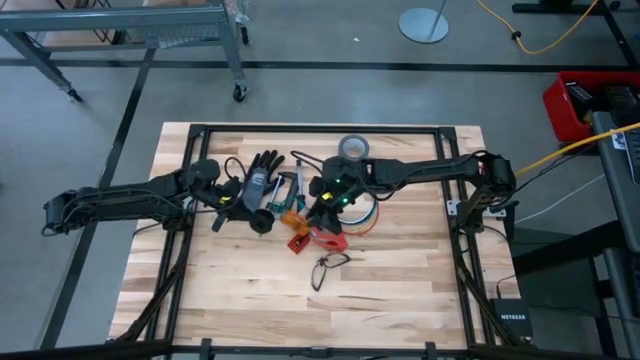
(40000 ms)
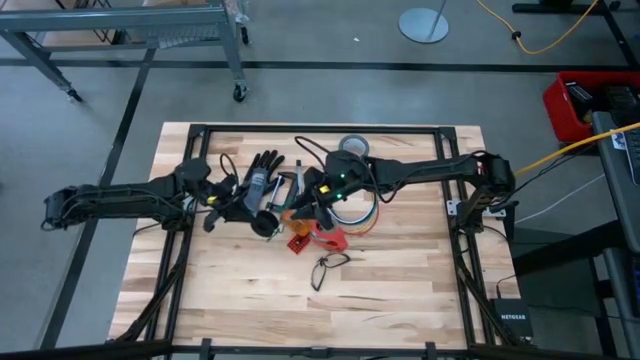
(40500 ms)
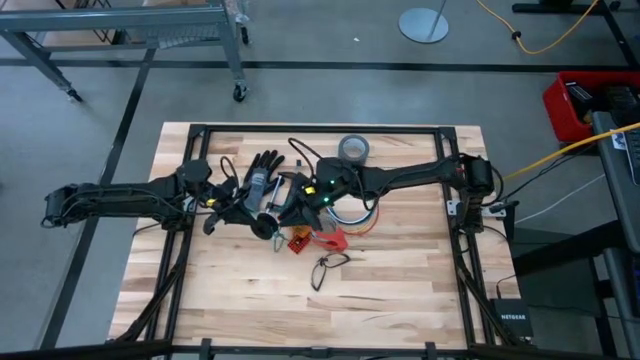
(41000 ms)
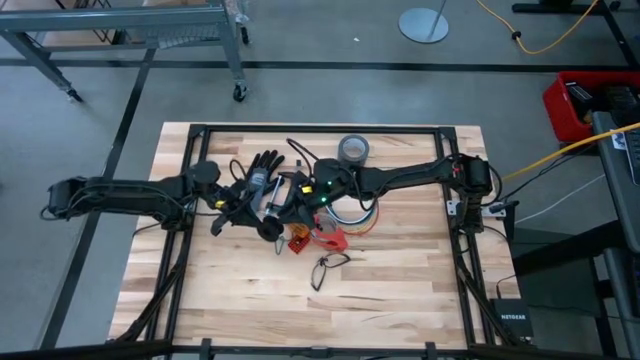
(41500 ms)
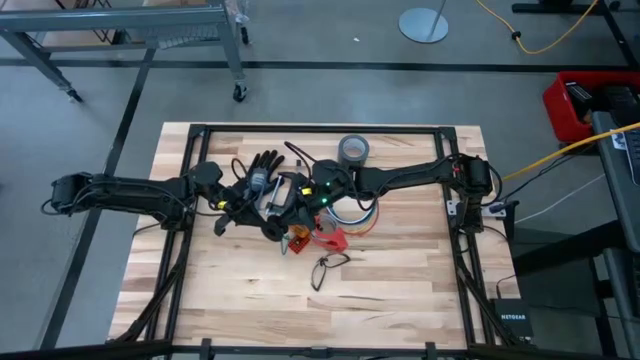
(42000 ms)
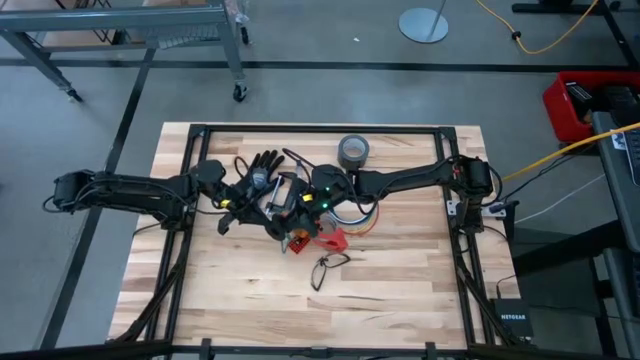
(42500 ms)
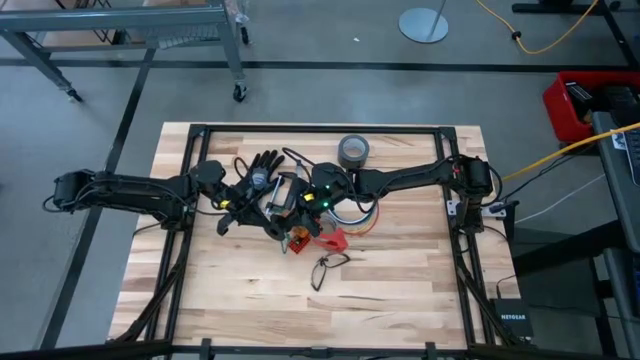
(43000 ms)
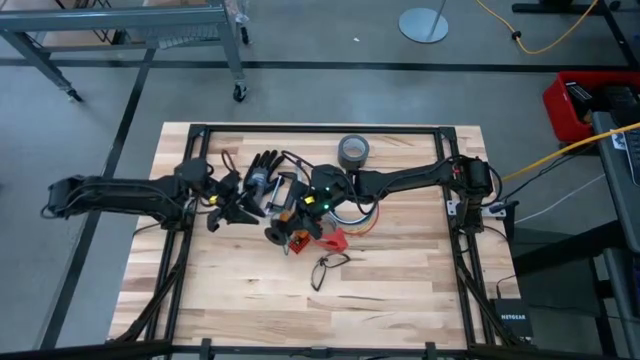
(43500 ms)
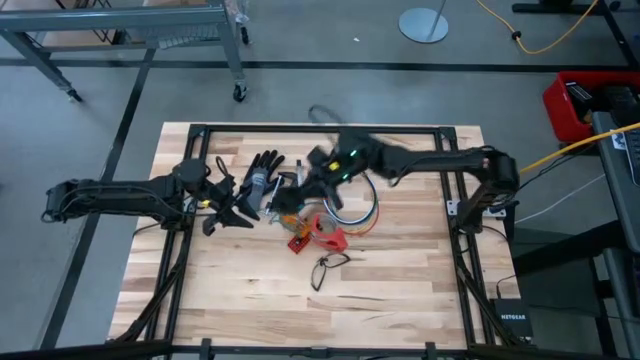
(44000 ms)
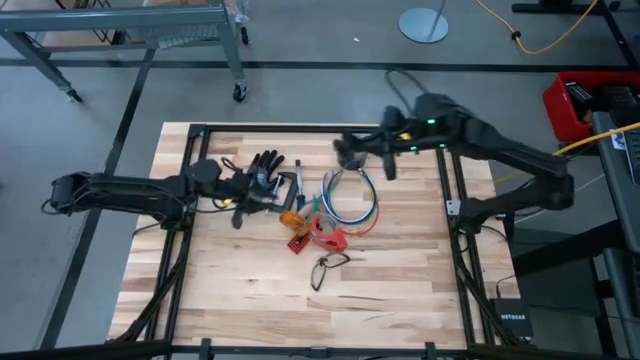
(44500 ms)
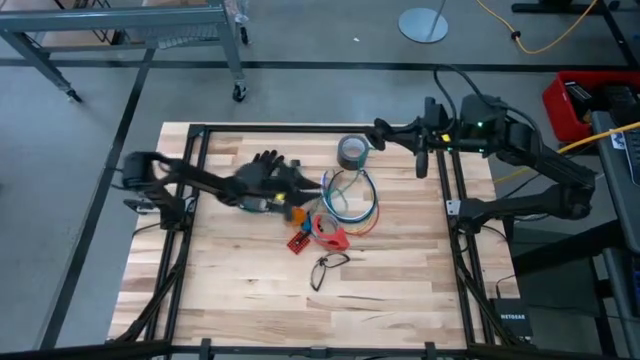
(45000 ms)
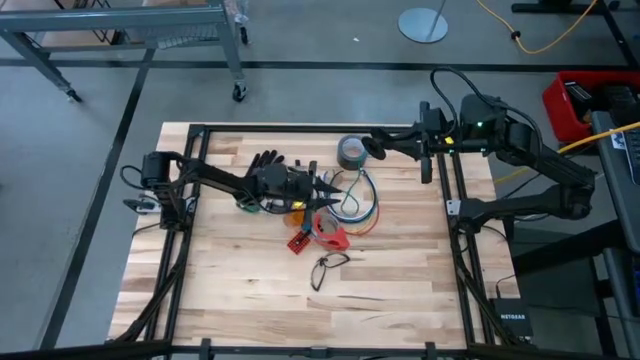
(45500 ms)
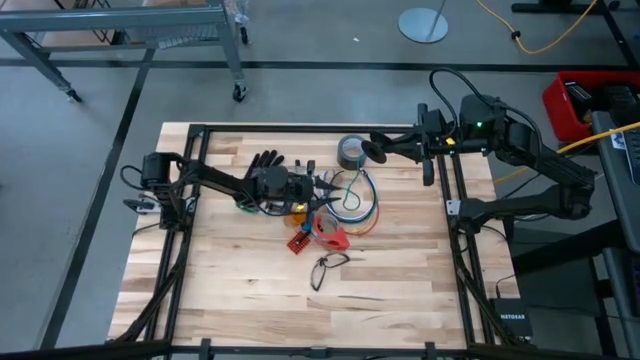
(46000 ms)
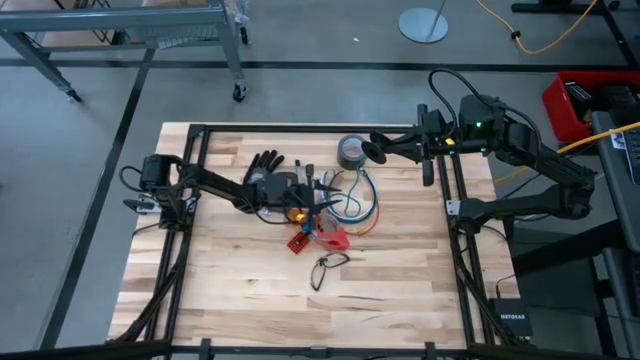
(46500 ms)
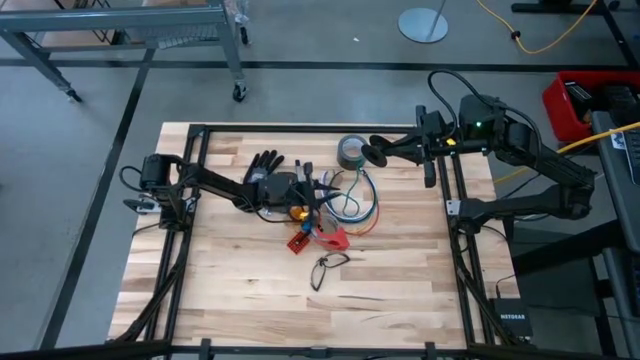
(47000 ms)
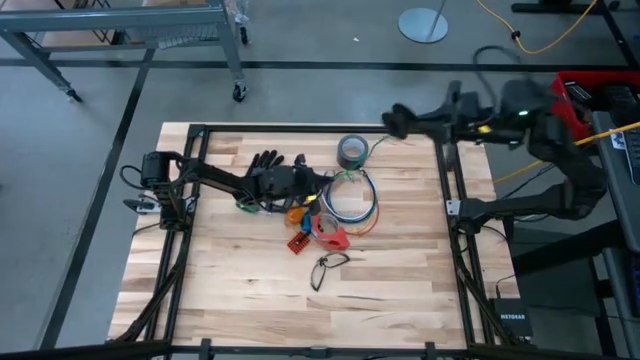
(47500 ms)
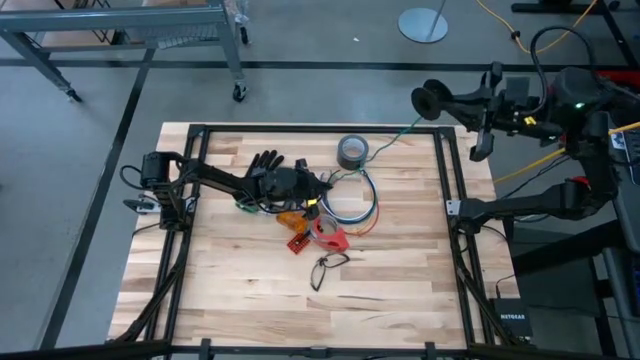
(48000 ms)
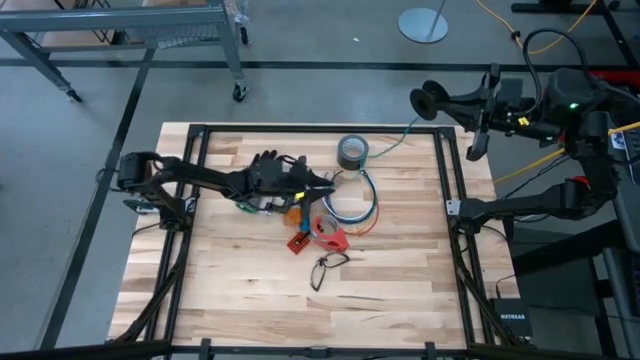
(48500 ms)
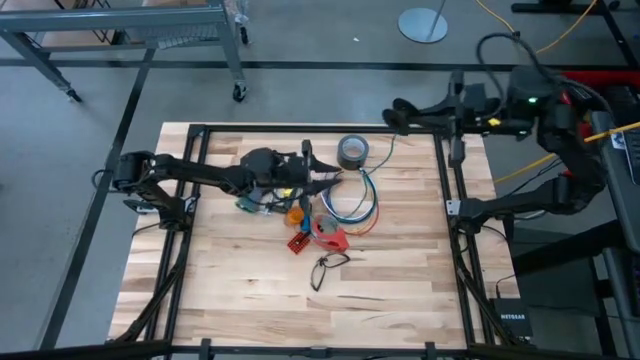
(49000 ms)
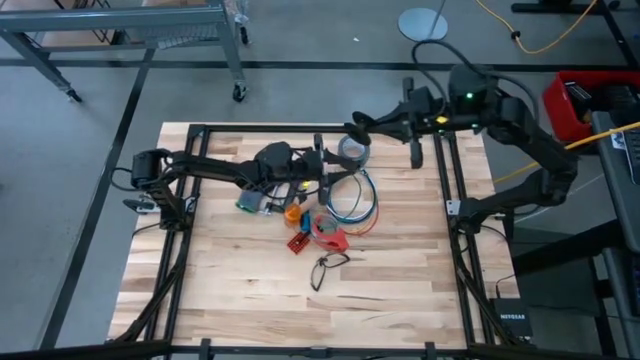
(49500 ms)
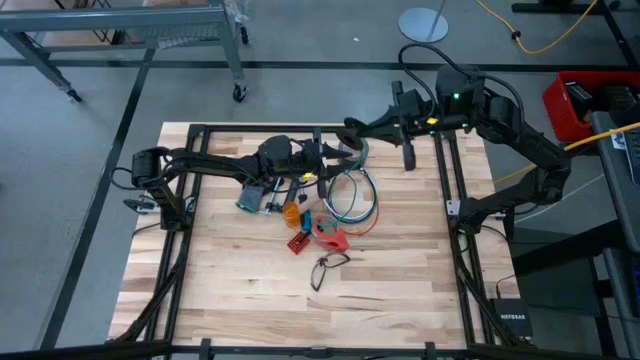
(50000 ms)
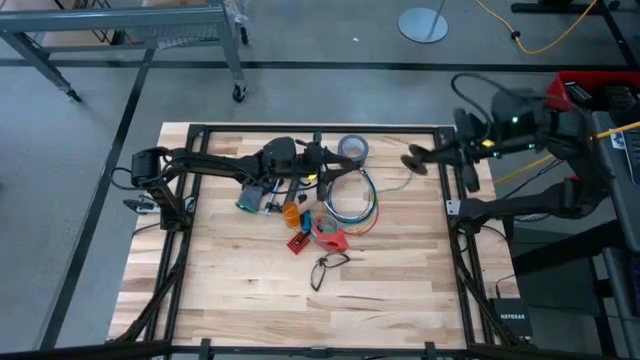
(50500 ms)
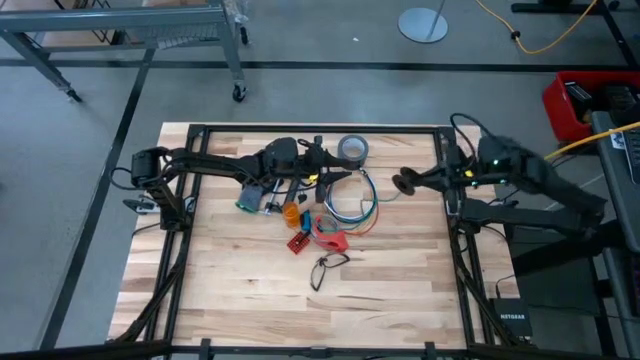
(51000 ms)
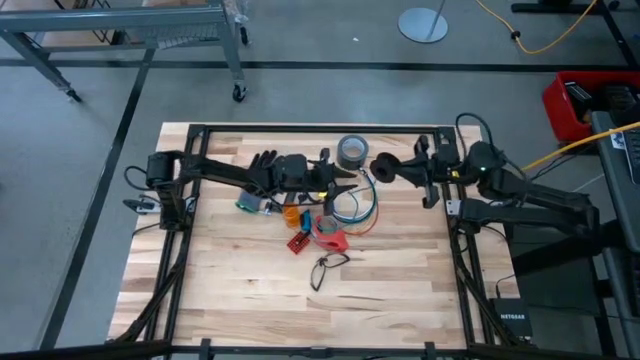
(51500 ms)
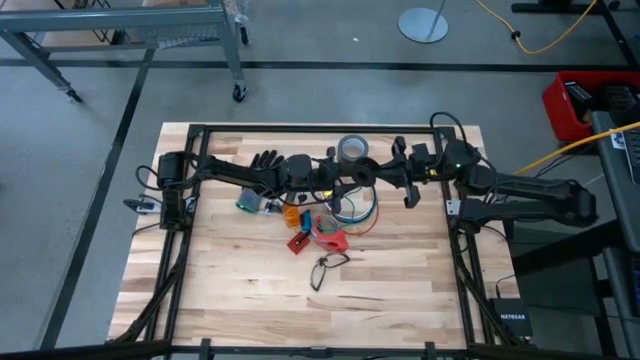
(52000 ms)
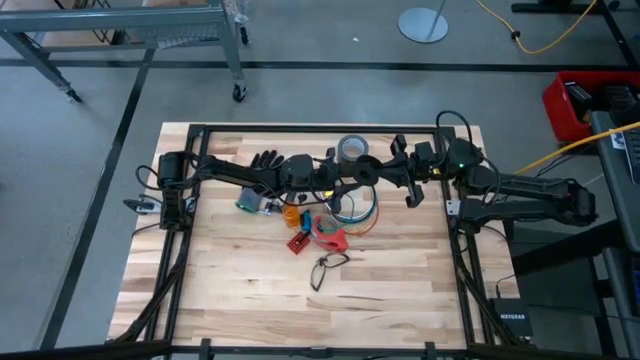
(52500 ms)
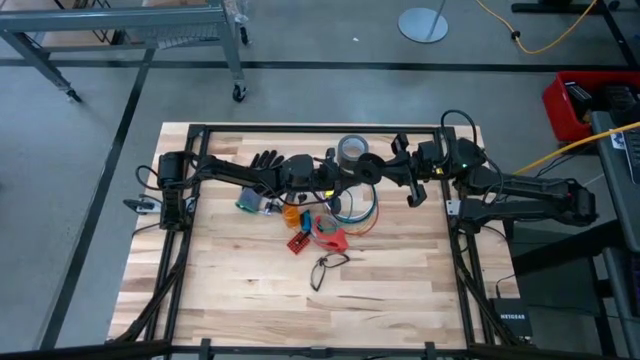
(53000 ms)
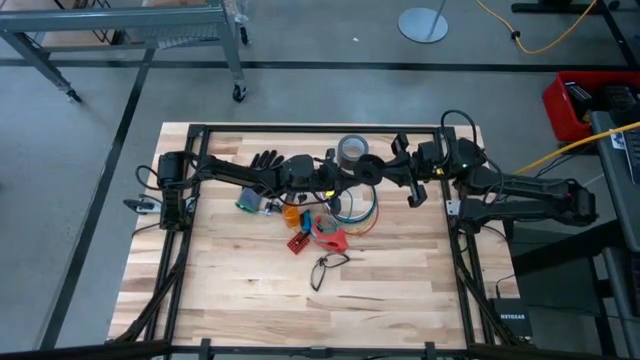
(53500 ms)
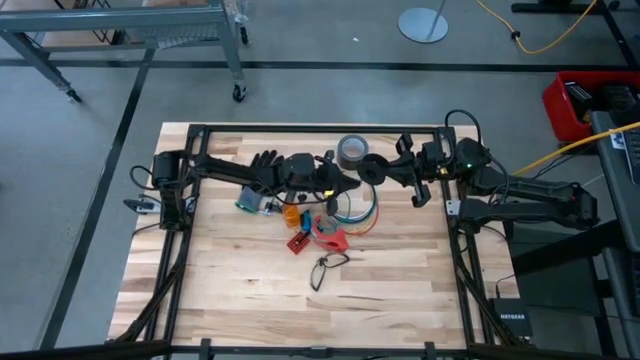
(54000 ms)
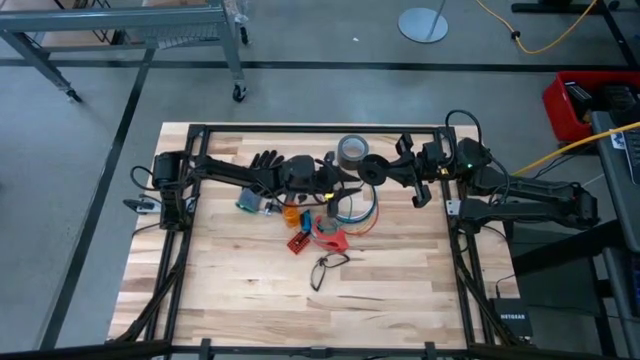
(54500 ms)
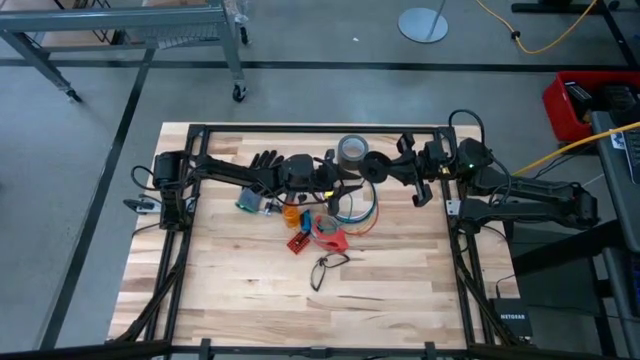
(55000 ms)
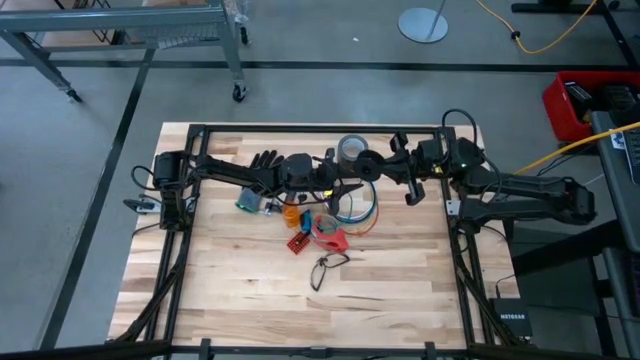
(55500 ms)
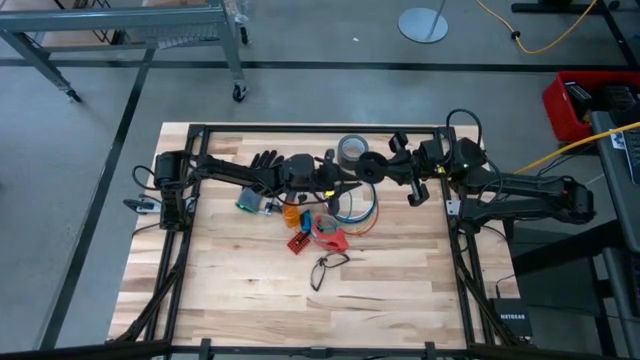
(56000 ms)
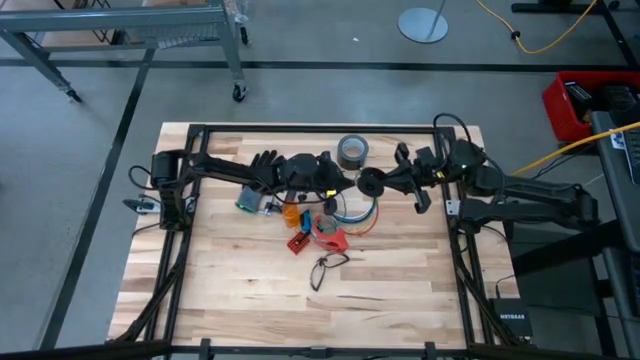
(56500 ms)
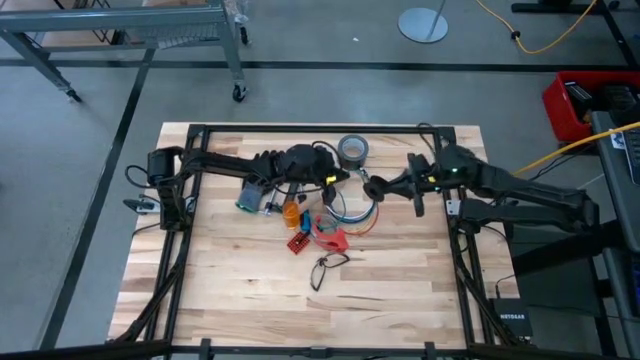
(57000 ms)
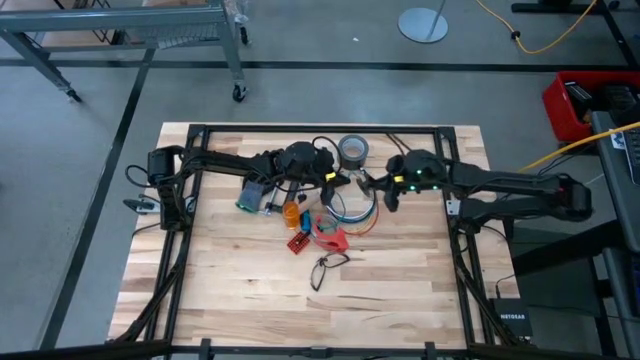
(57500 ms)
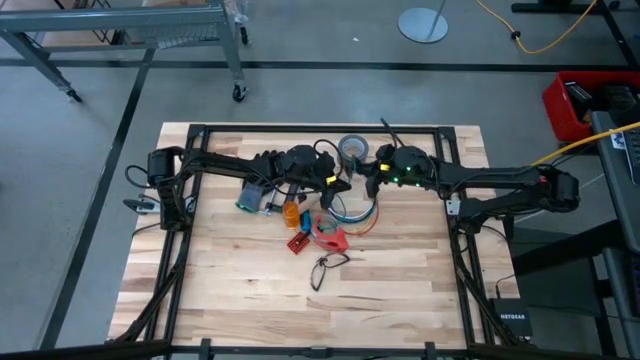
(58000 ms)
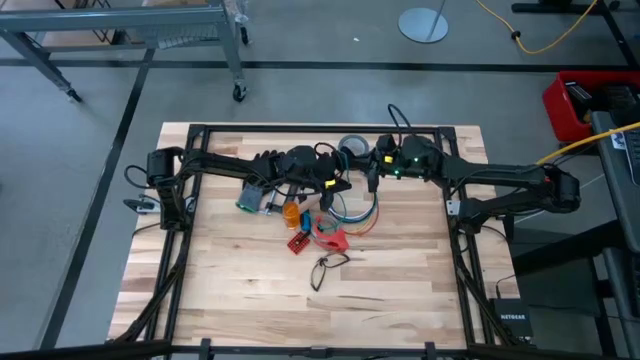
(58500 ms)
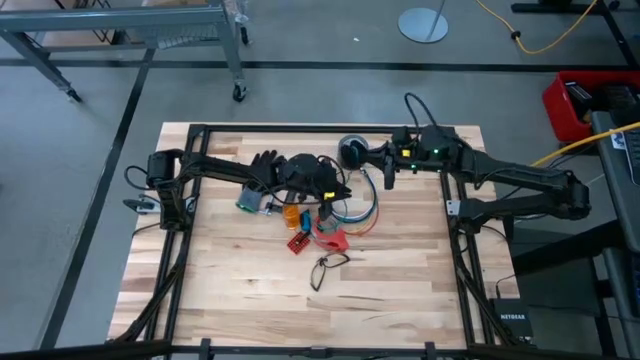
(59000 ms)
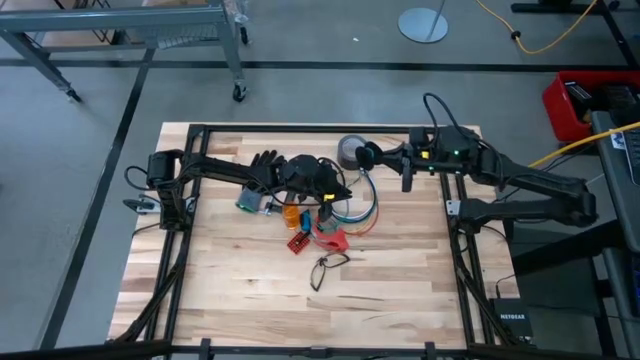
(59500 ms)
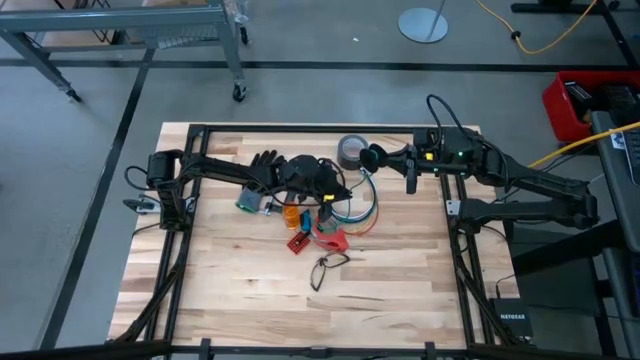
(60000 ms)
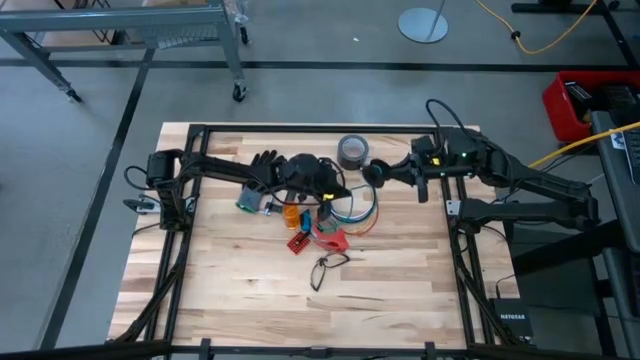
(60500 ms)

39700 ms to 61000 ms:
Task: Coil cords
Coil the green wire on the spool
